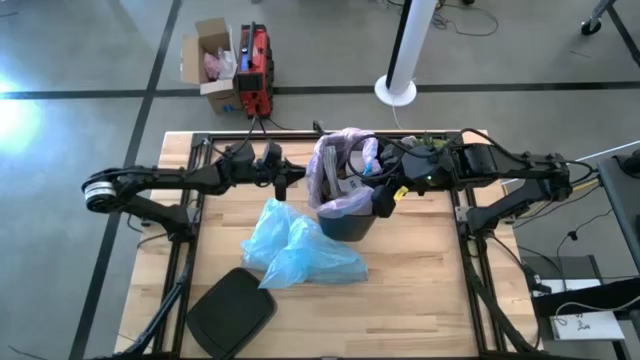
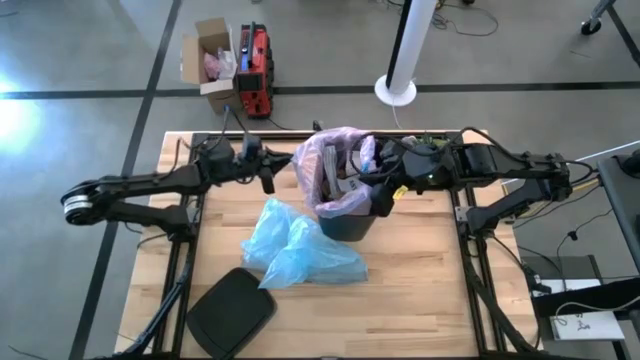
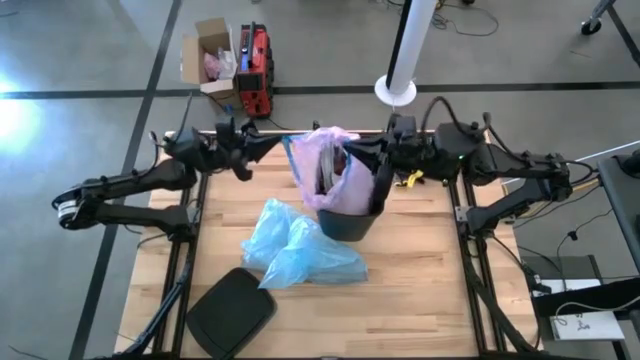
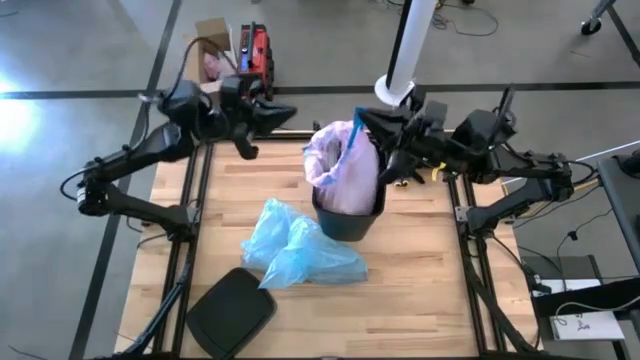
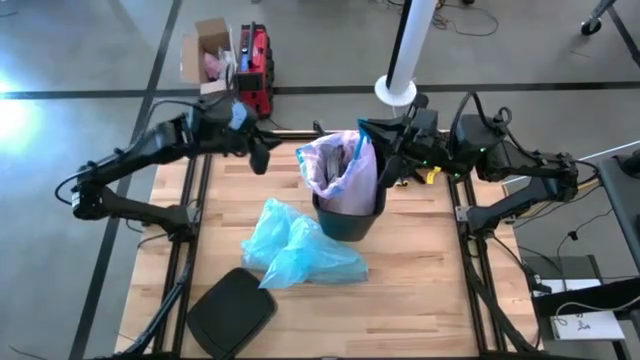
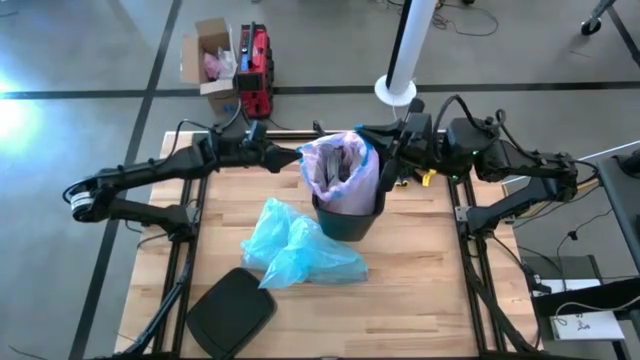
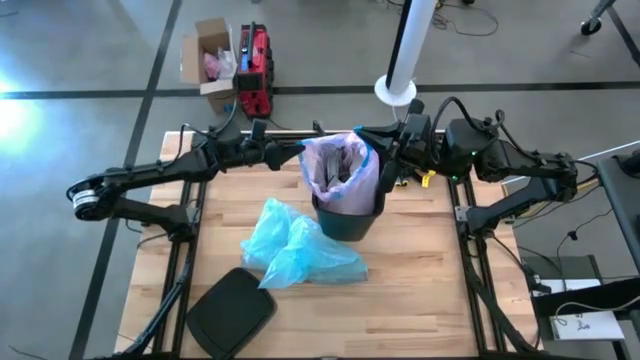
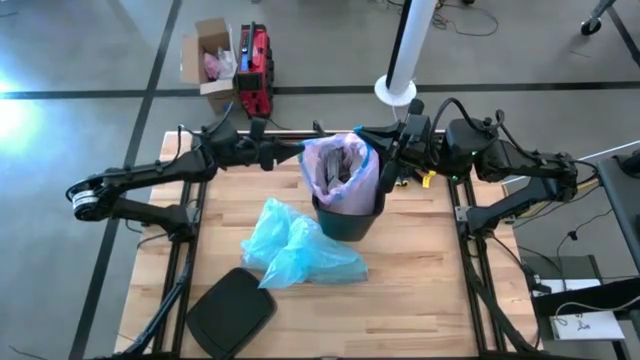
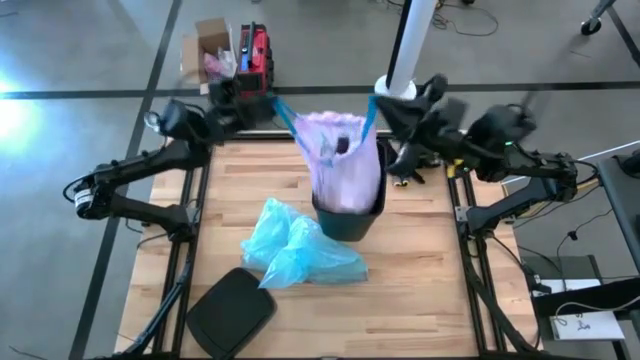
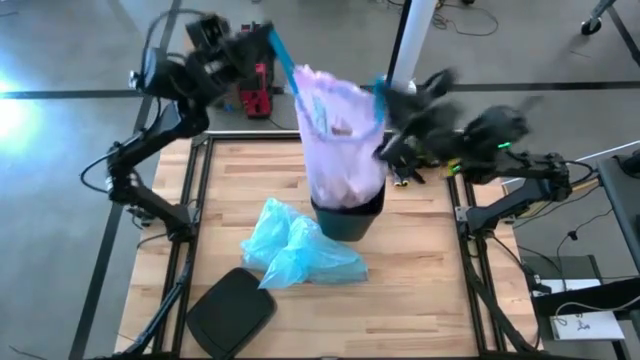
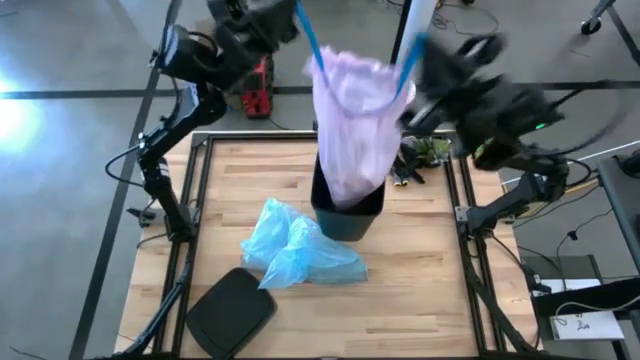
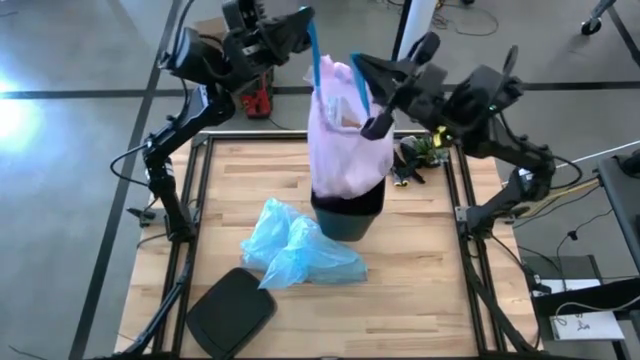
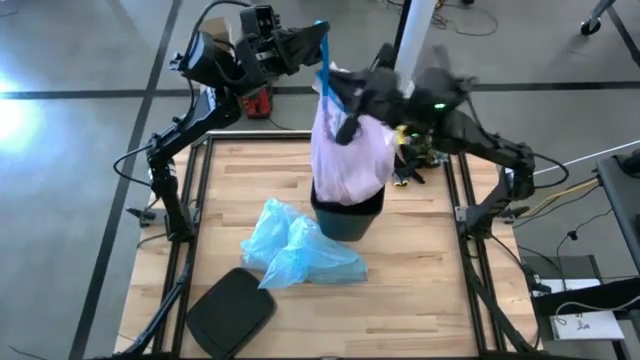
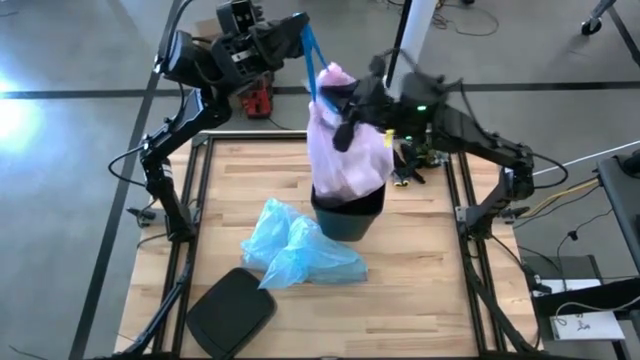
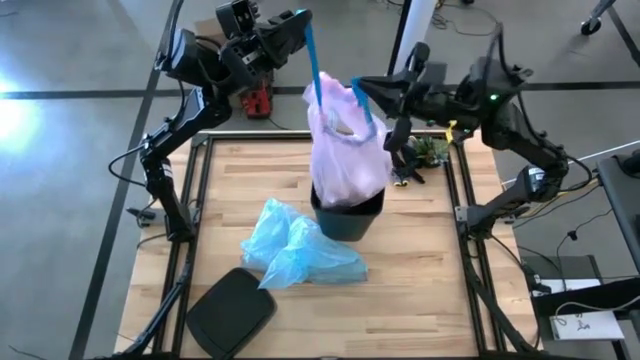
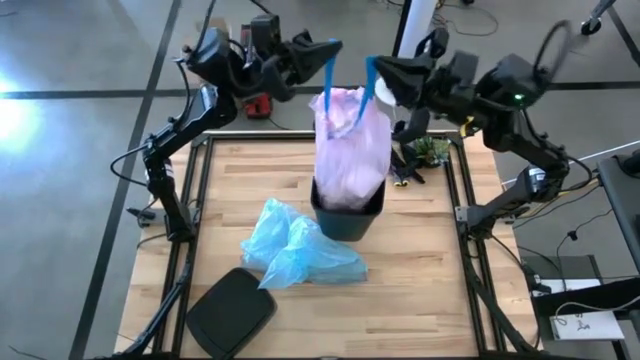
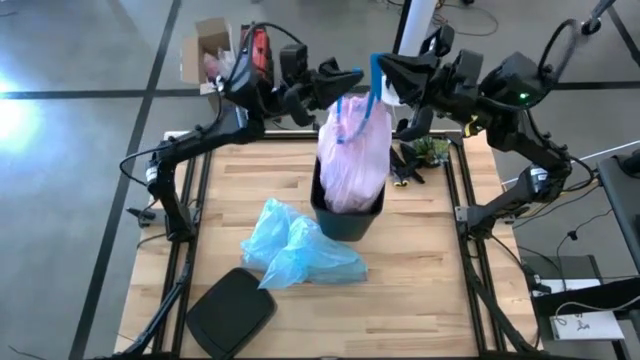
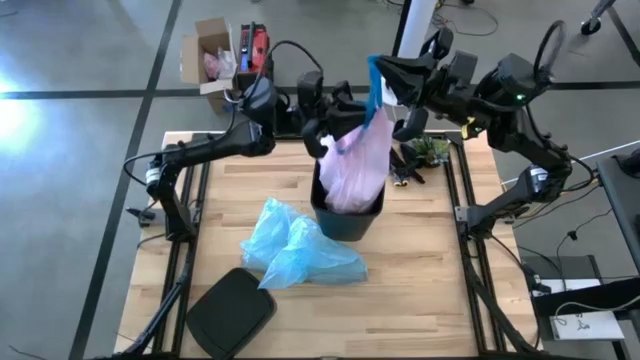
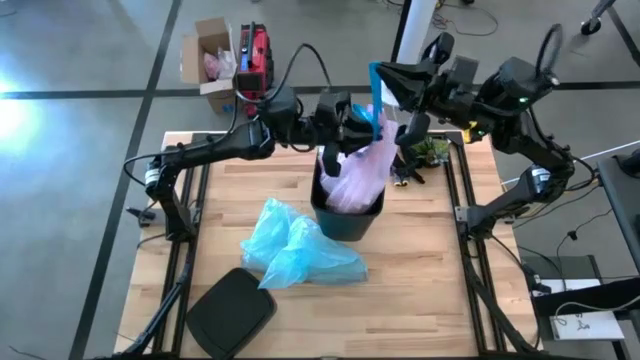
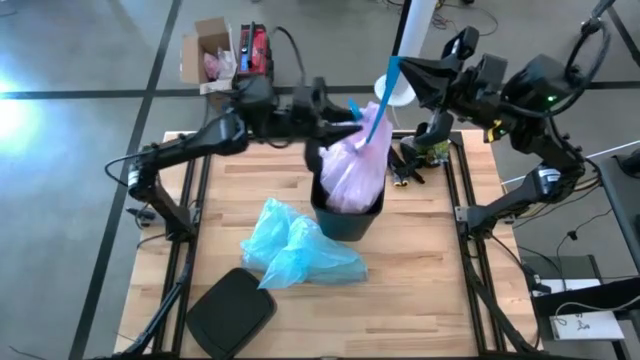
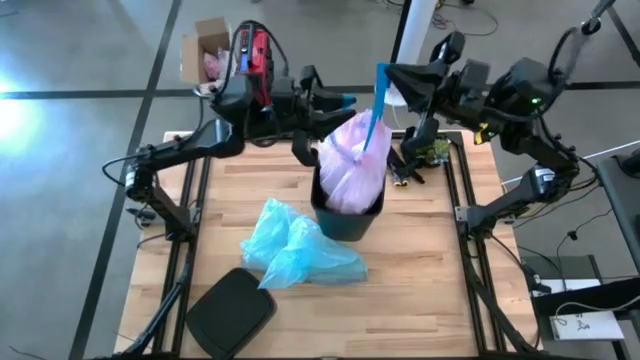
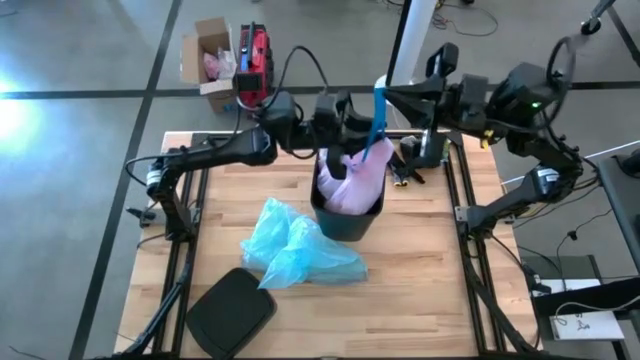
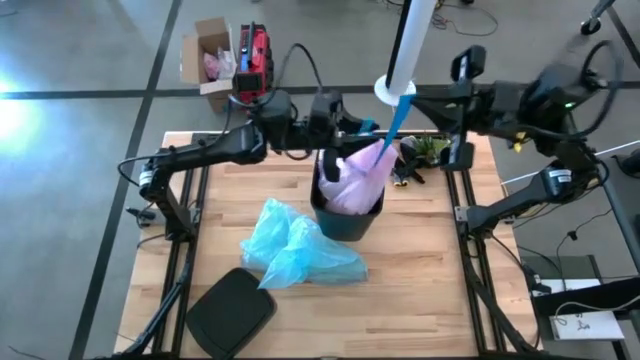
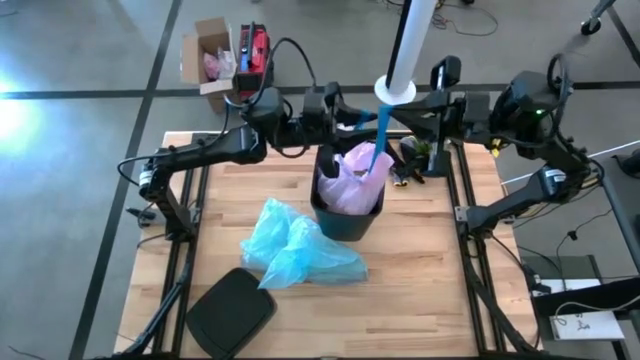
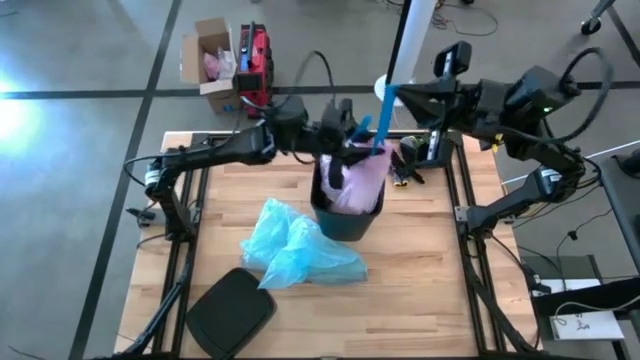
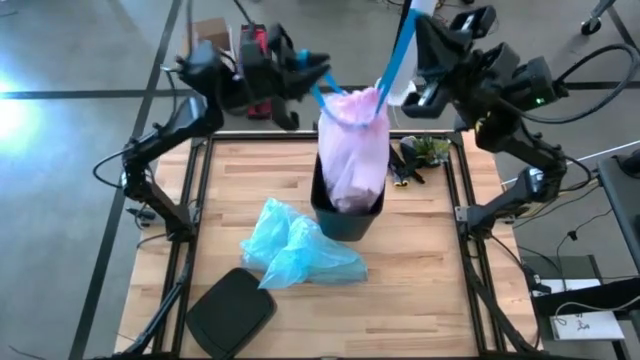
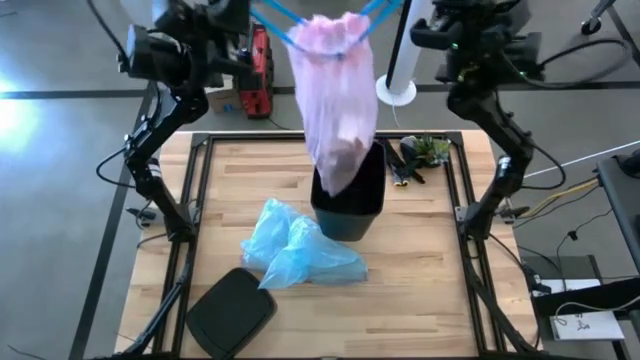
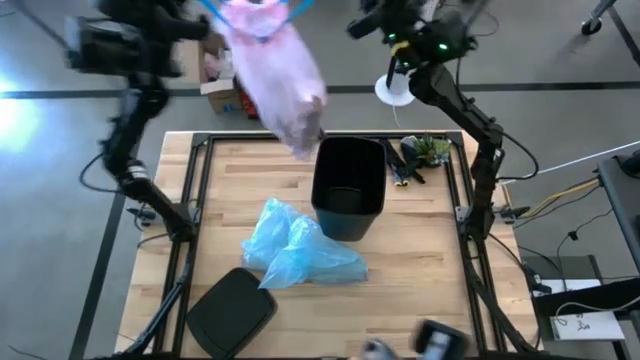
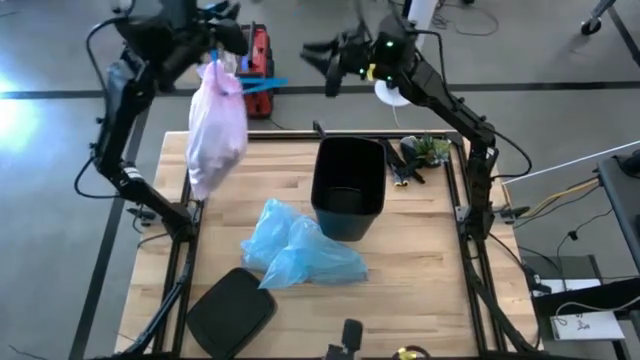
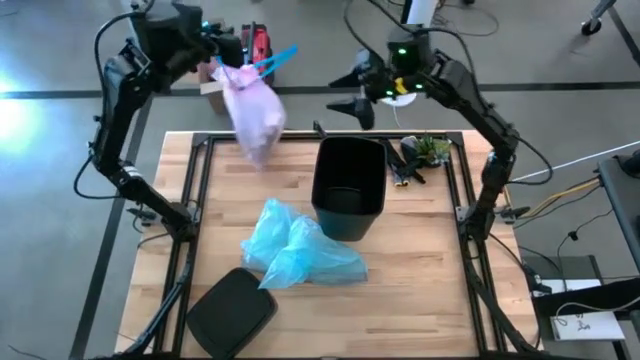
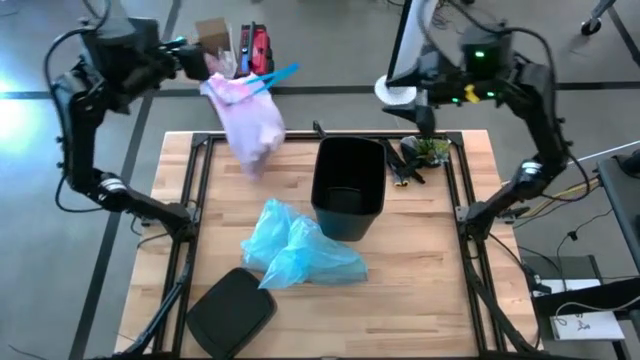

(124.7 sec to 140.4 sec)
Task: place trash/remove bag and relplace
Remove the pink trash bag from the trash bin

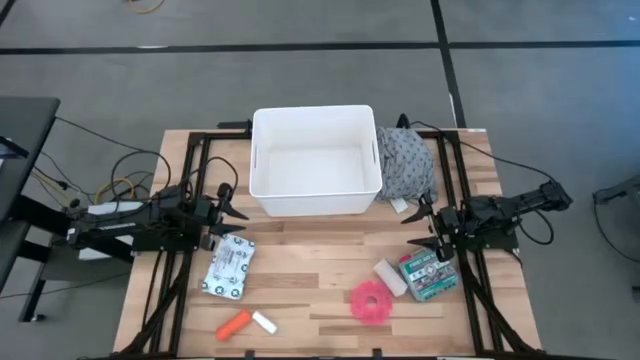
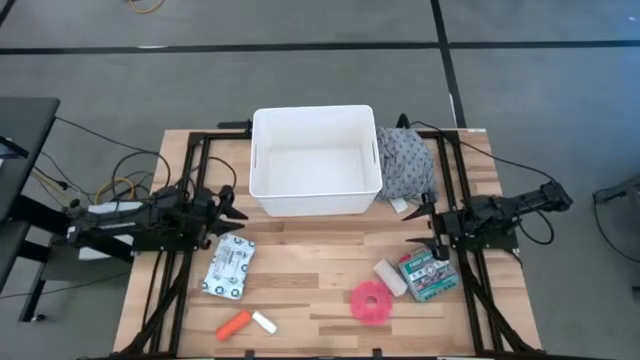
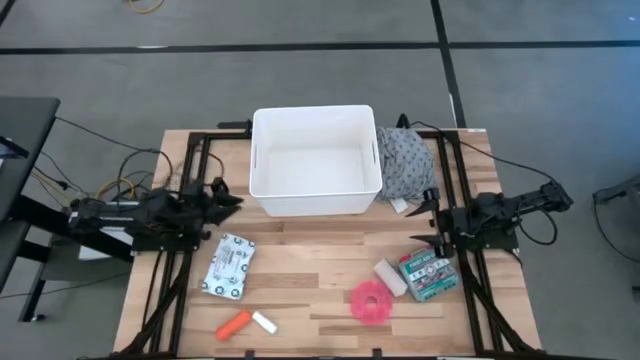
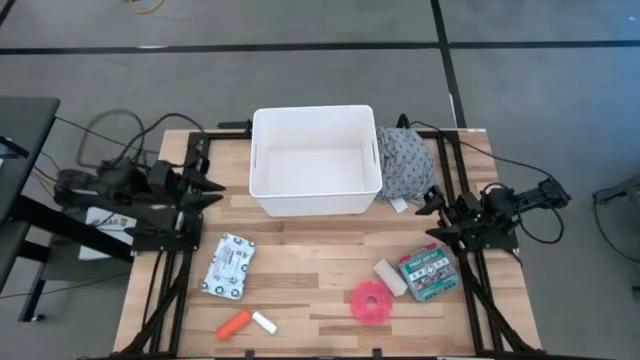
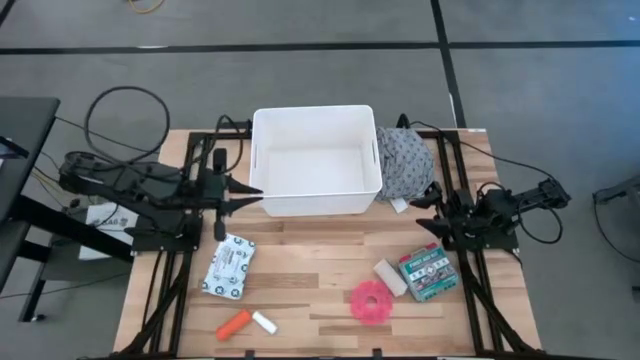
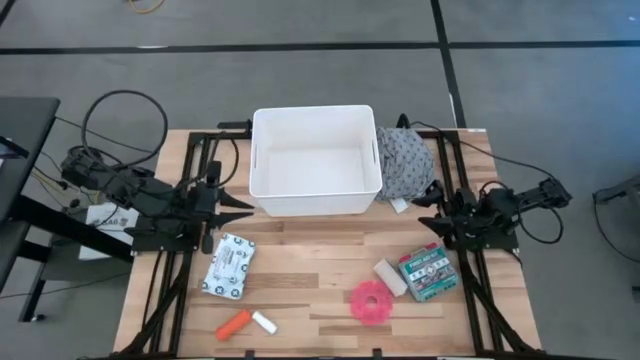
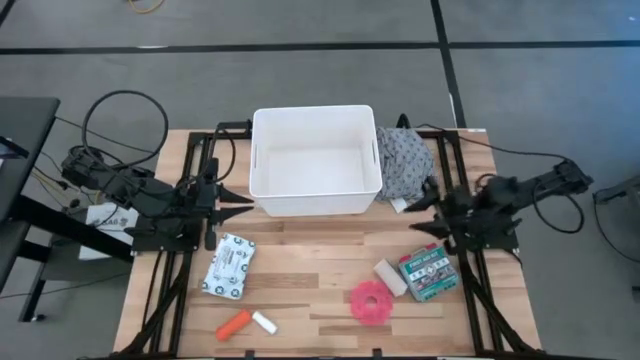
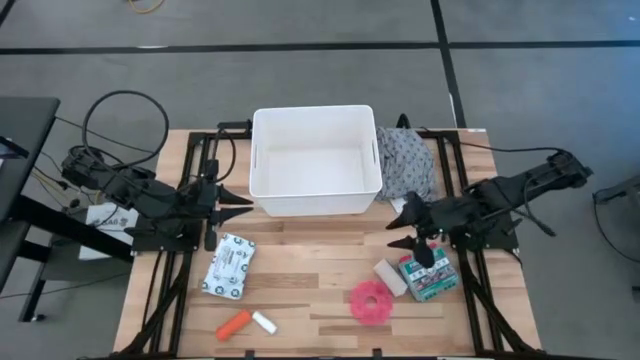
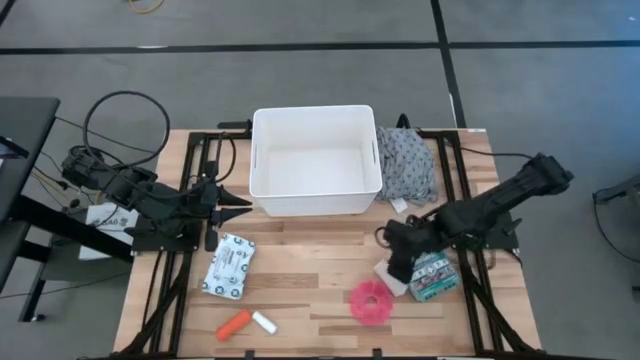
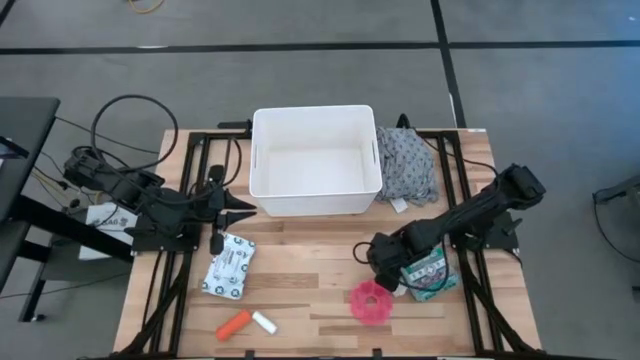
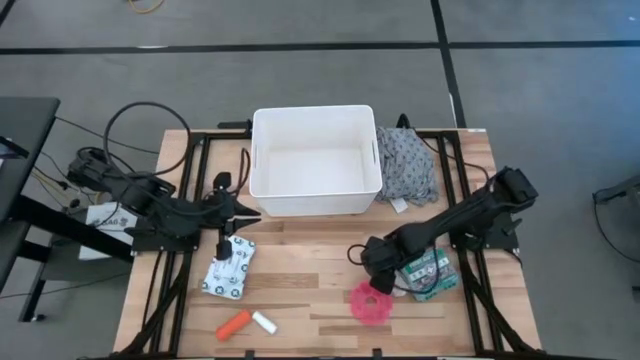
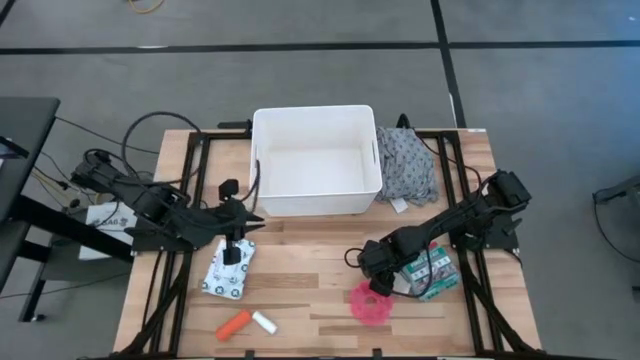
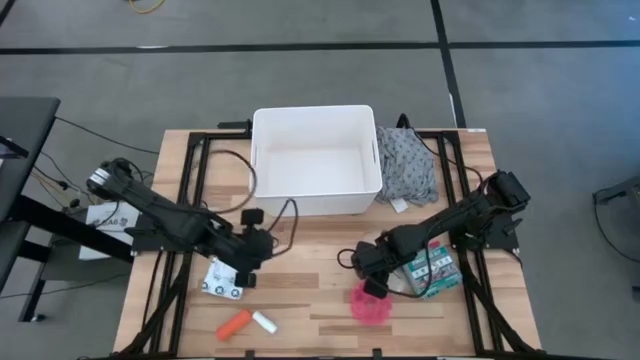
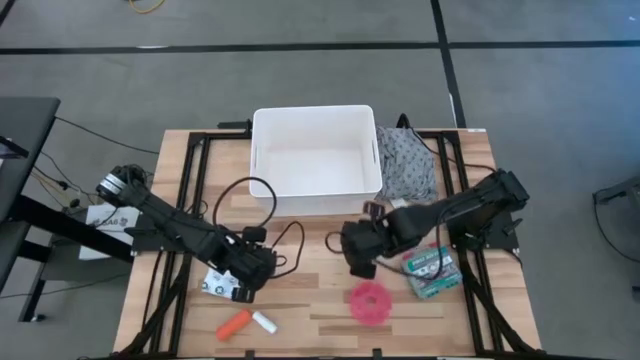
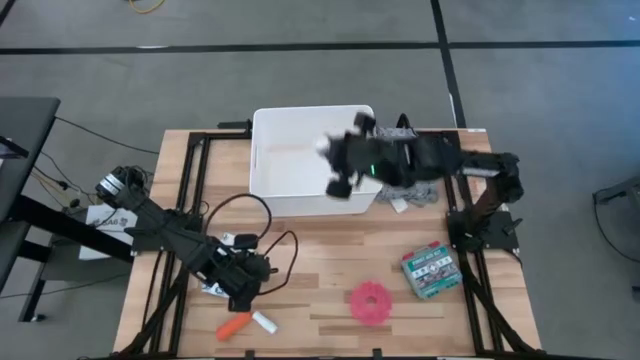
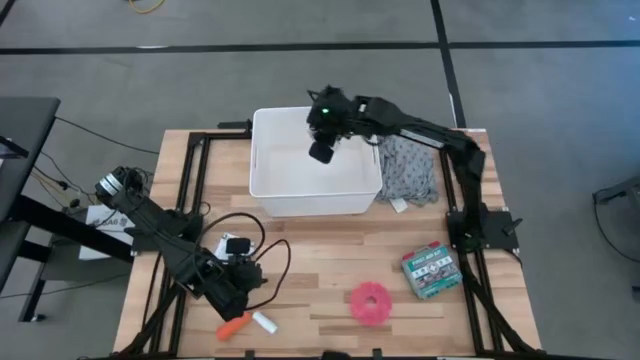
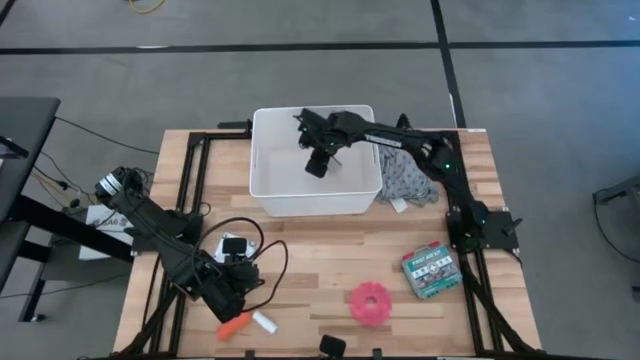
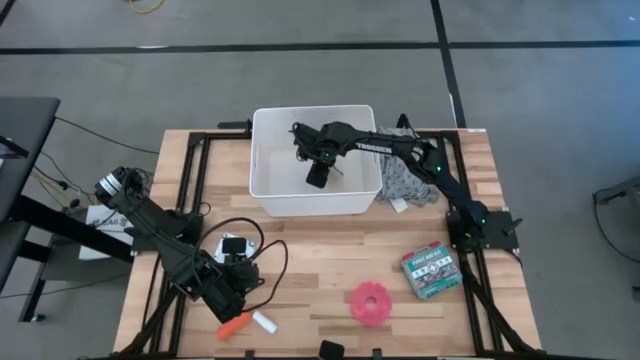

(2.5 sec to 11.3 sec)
Task: Pick & place medical supplies in basket/bin
Put the brown bandage into the white bin
